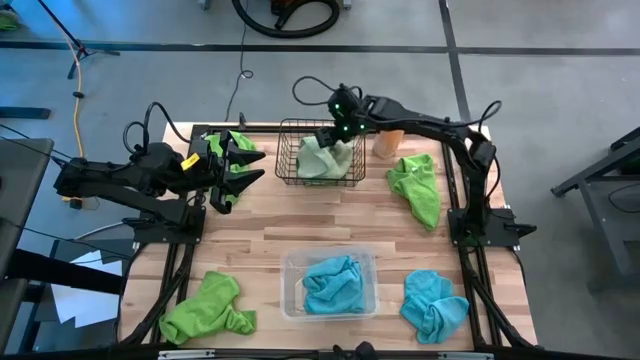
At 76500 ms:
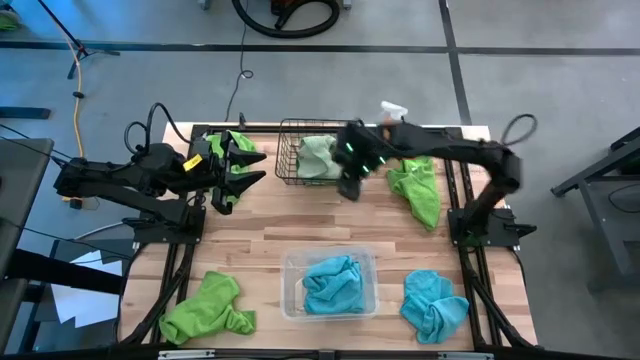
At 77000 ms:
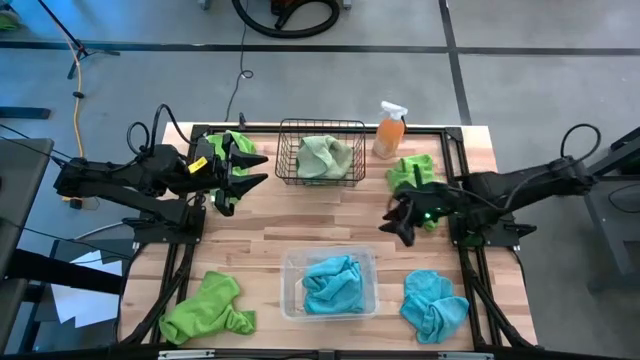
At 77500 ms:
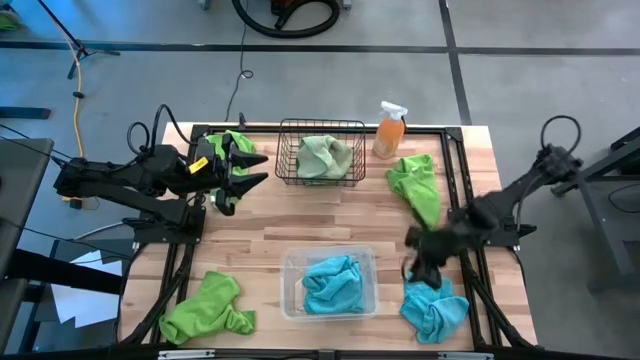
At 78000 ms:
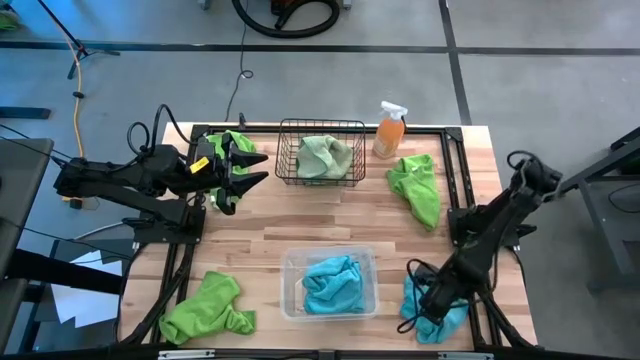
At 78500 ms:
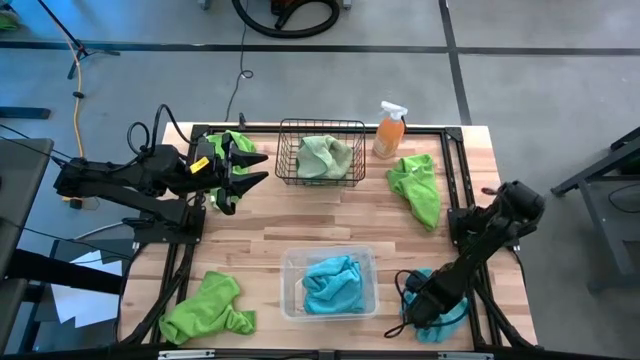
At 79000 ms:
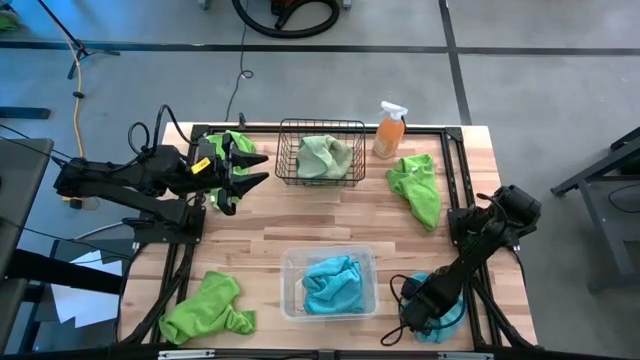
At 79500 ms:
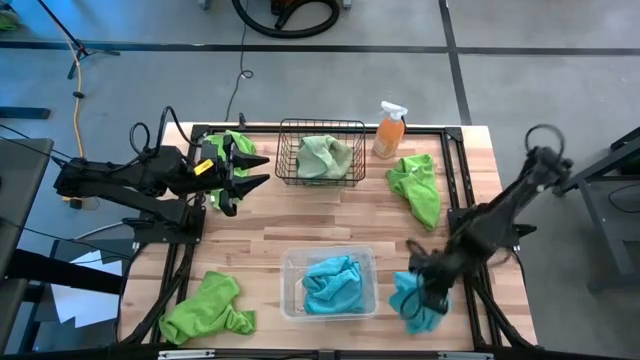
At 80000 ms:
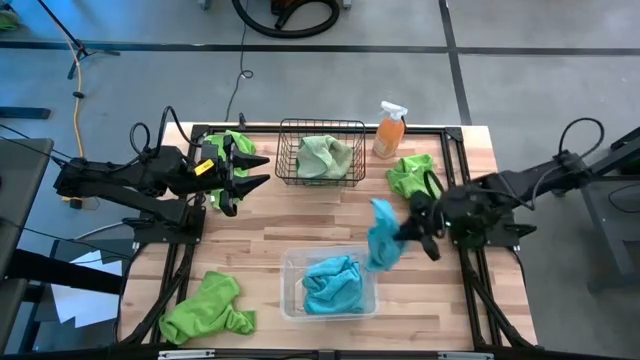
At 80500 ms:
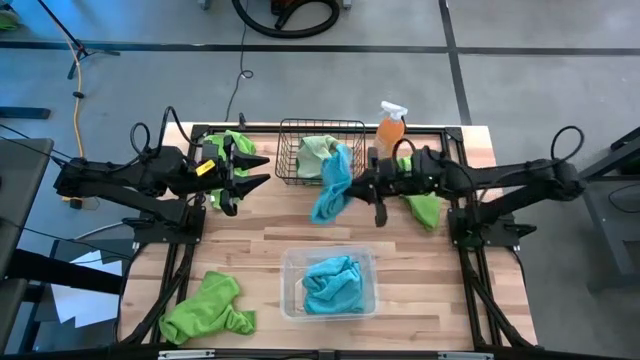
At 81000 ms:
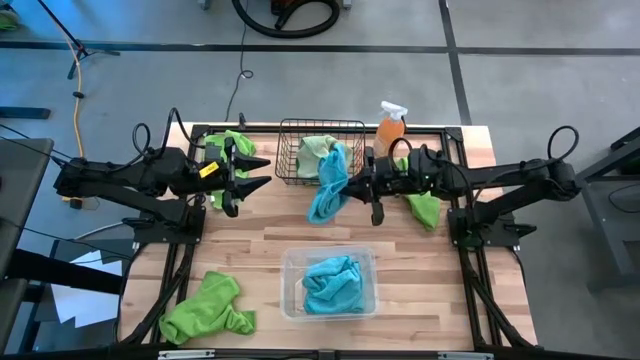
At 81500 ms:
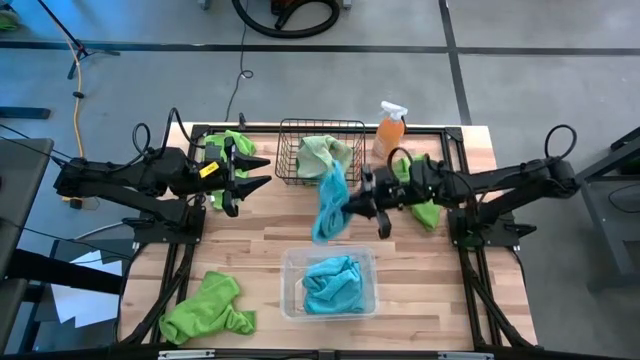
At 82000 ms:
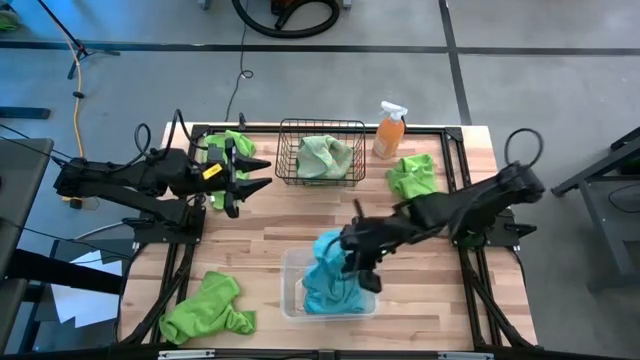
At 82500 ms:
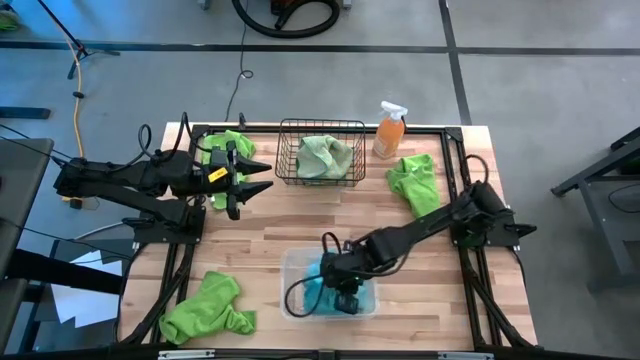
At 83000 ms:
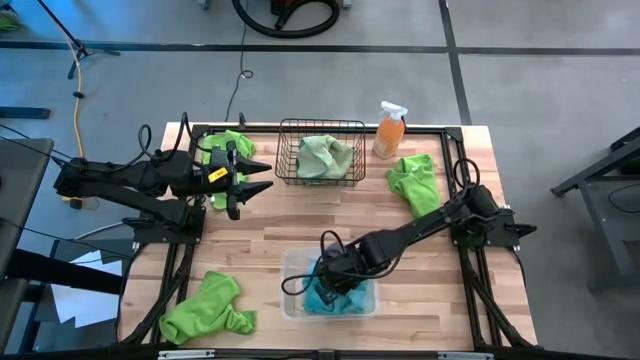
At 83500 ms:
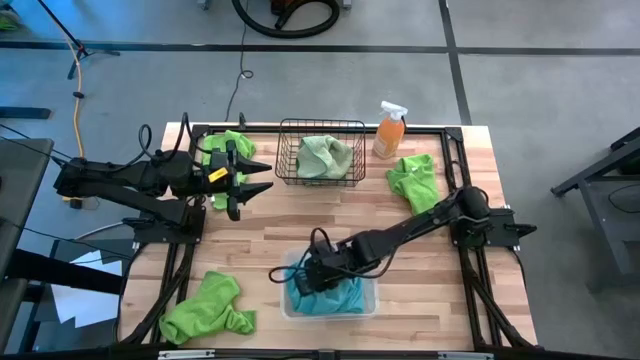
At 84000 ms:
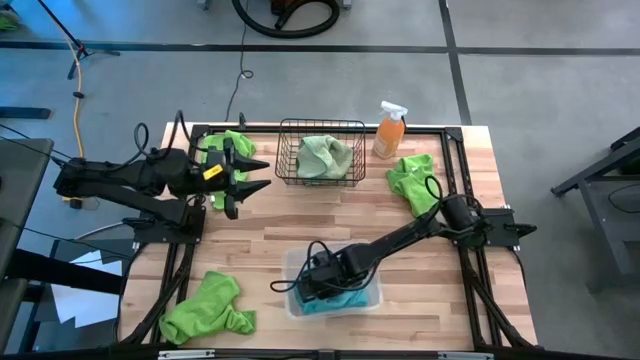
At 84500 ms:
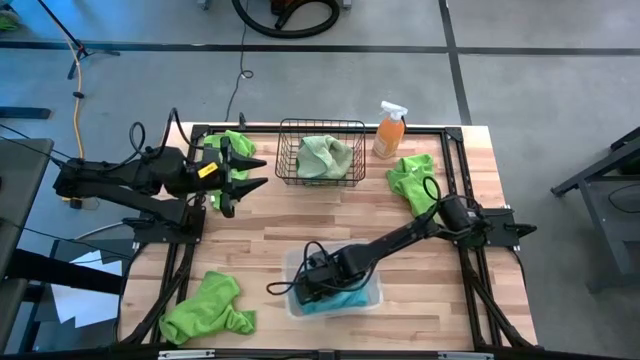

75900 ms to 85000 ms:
Task: Sort microfiber towel by color & place in baskets
Put the blue towel into the basket

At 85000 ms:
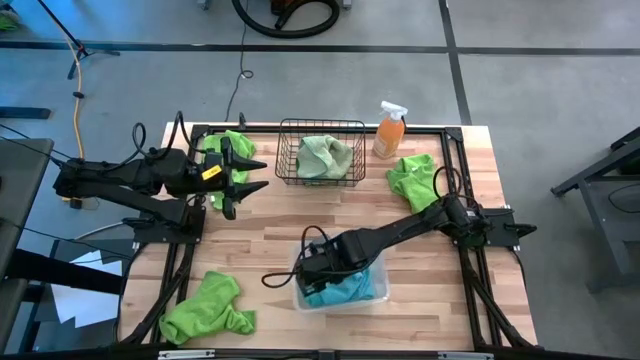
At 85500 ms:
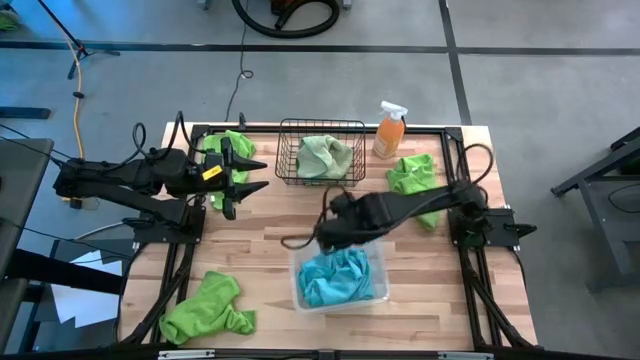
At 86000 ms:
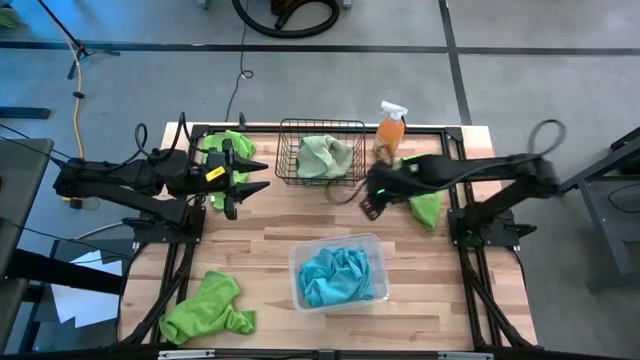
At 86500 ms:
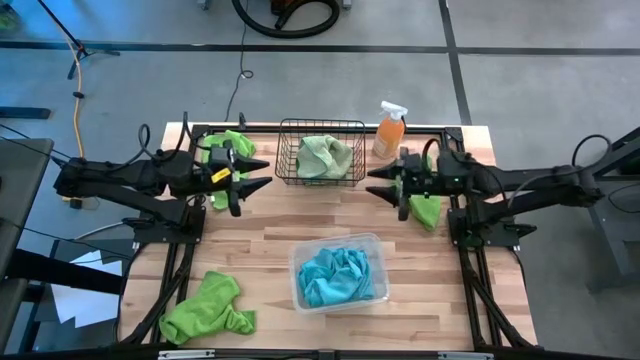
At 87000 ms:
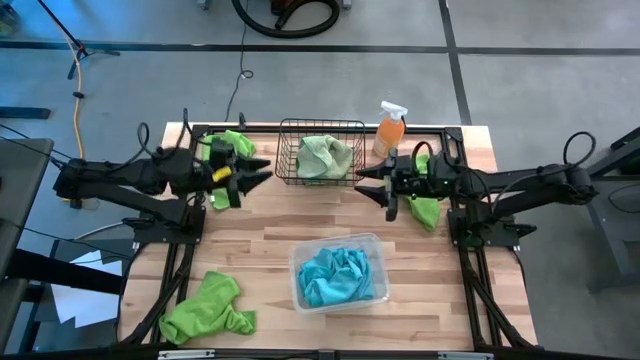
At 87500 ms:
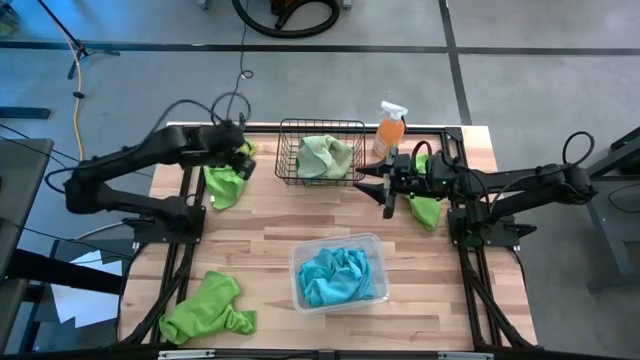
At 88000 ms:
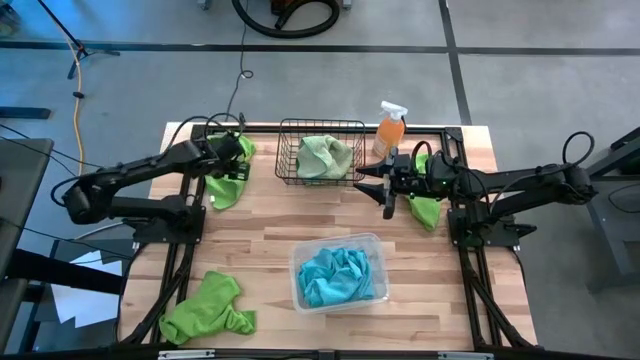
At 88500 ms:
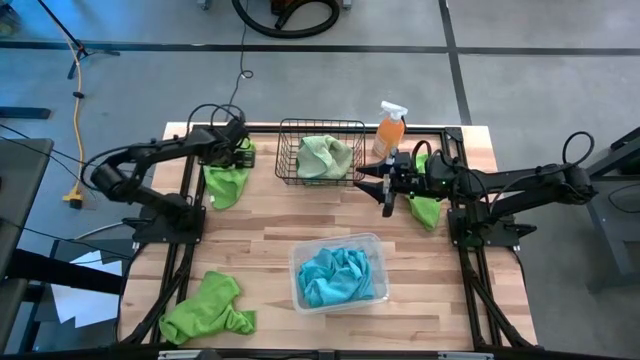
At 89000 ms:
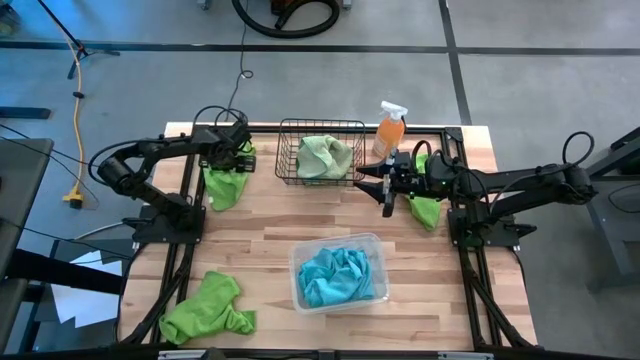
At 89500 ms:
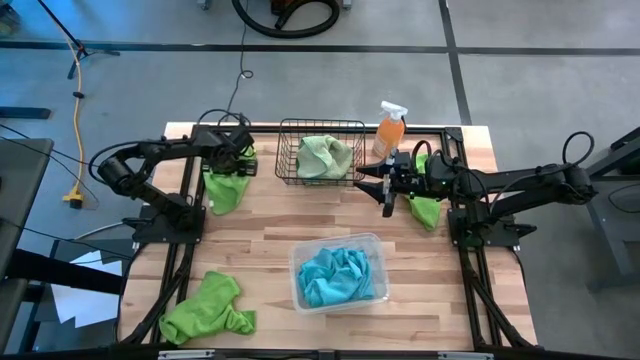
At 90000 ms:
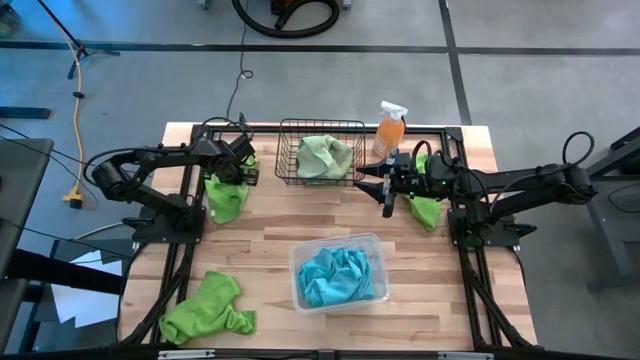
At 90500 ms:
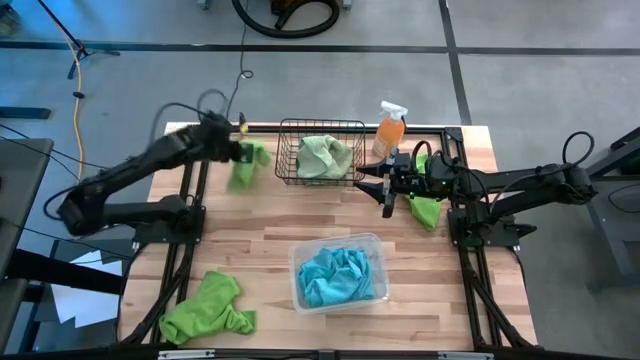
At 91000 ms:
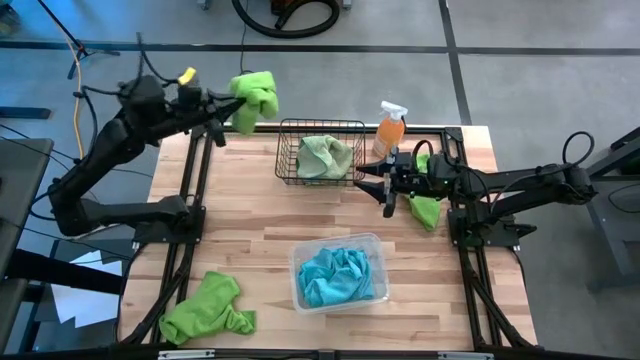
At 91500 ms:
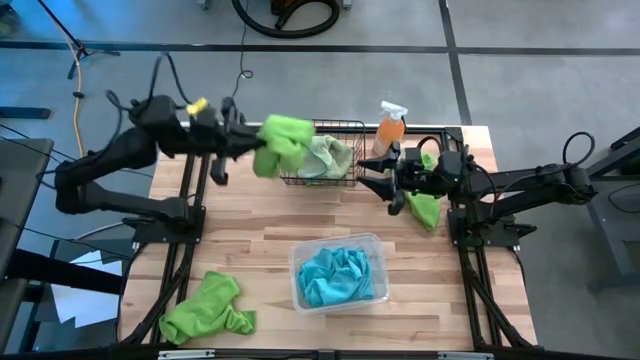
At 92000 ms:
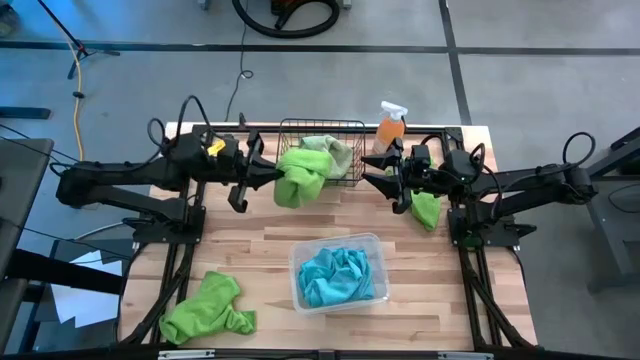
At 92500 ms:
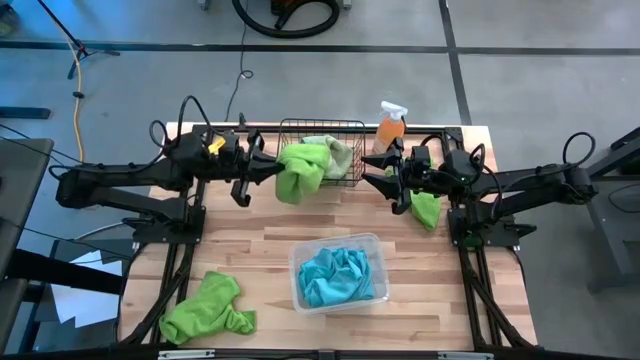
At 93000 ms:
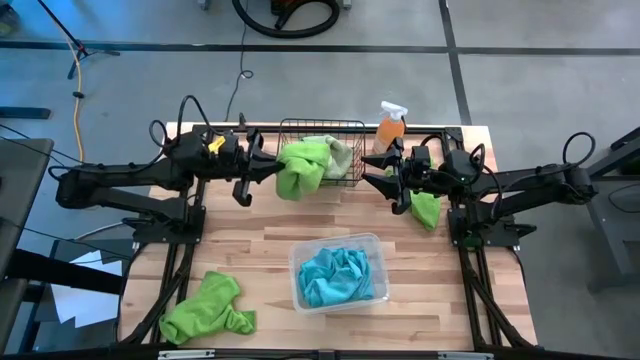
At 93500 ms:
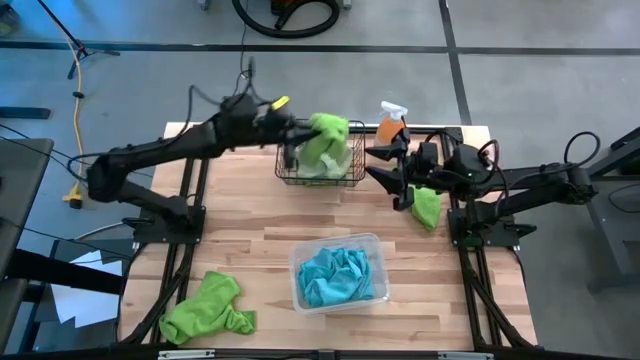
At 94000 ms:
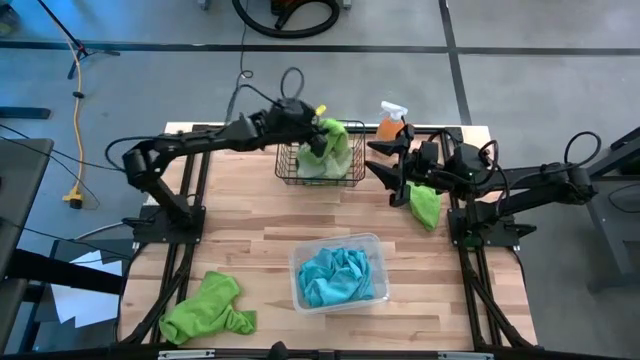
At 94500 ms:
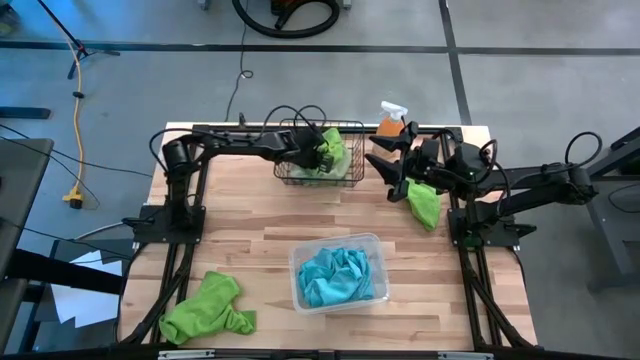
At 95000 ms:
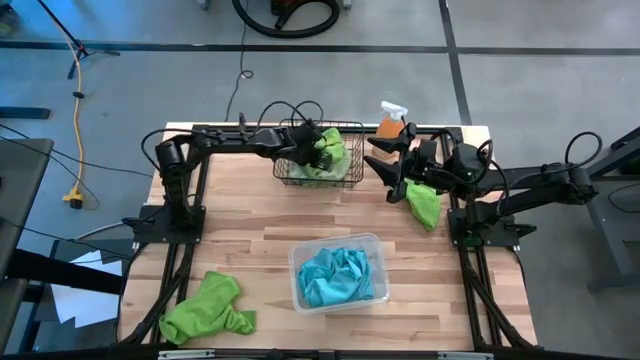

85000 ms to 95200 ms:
Put the top left green towel into the wire basket

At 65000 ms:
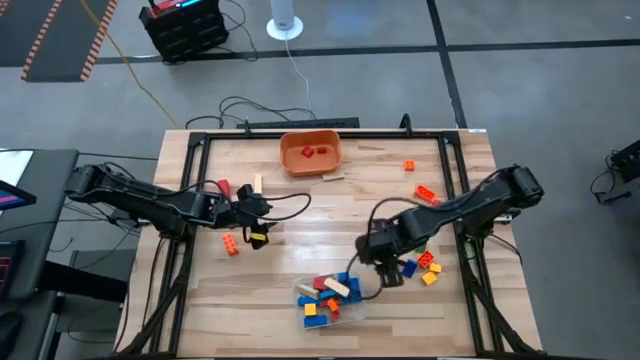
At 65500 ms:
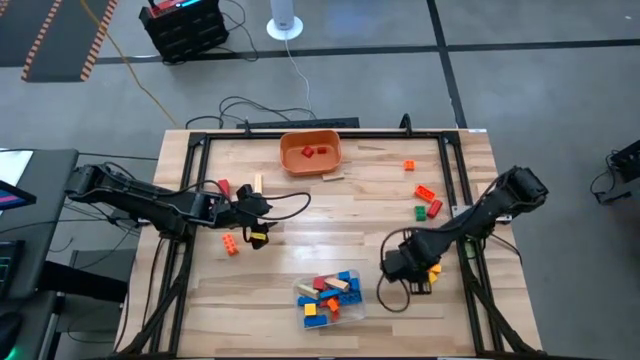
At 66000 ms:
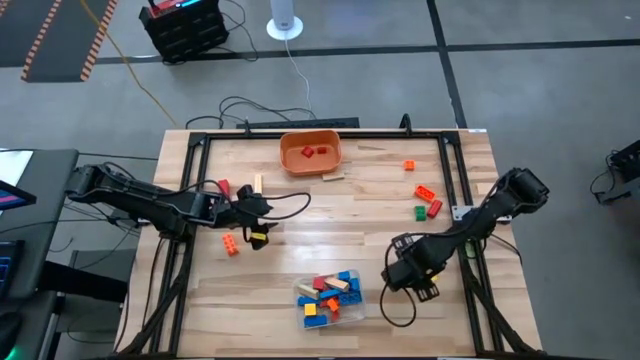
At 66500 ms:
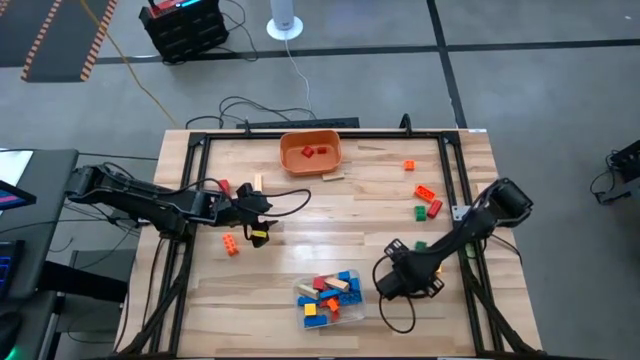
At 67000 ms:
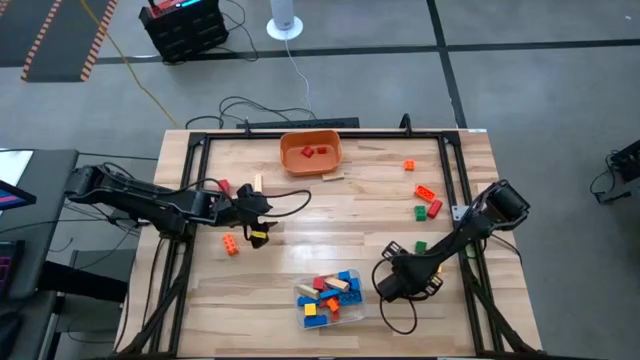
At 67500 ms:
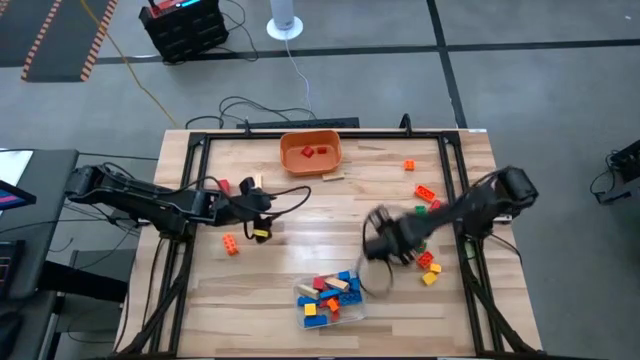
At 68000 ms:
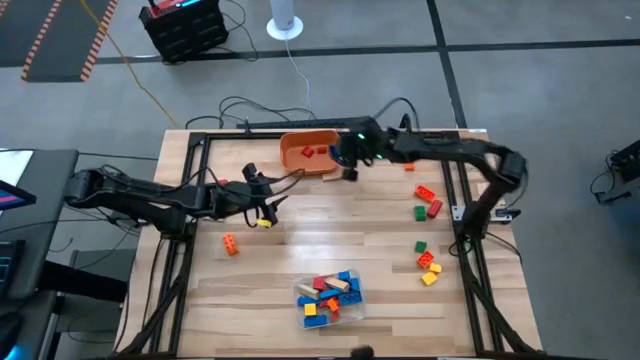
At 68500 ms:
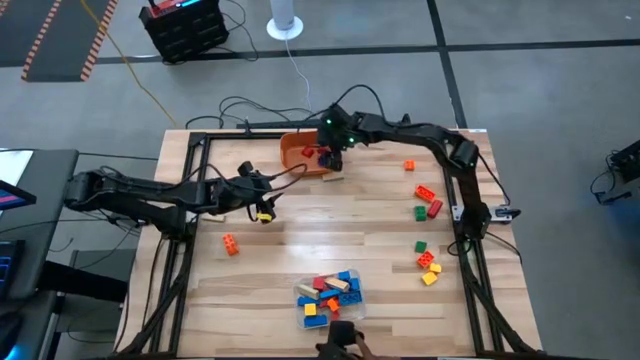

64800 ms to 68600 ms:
Task: Sort blocks by size
Put the small blue game piece into the orange bin
